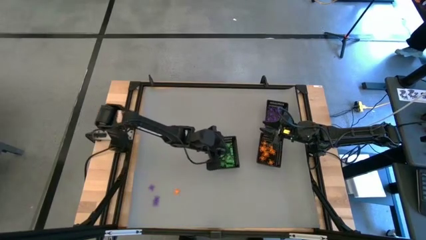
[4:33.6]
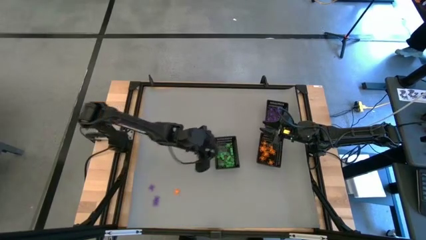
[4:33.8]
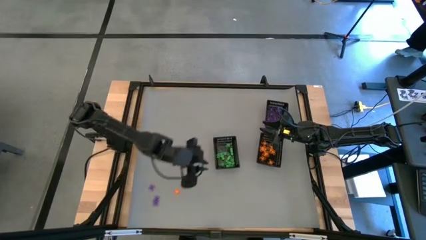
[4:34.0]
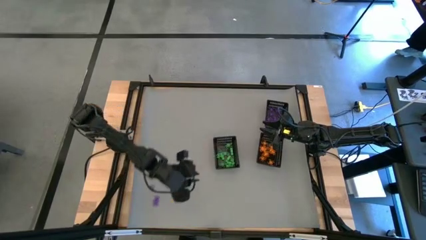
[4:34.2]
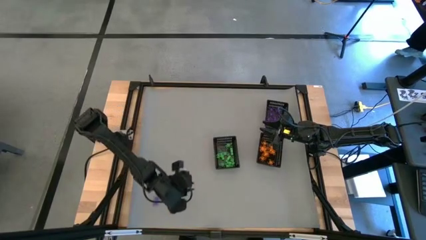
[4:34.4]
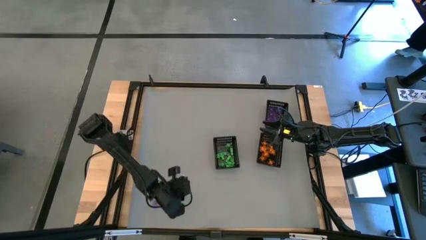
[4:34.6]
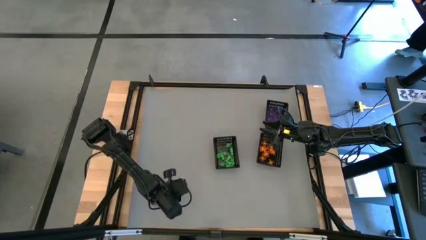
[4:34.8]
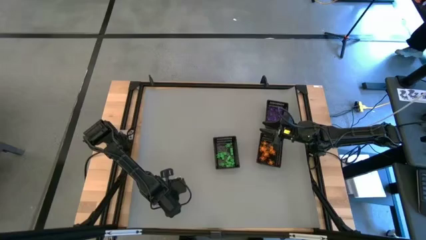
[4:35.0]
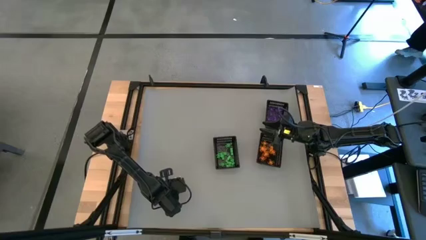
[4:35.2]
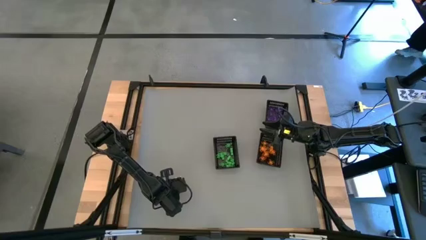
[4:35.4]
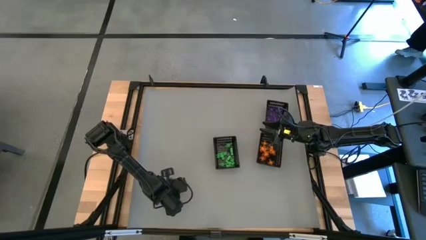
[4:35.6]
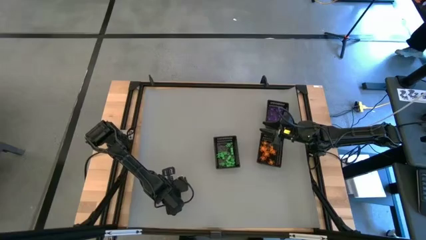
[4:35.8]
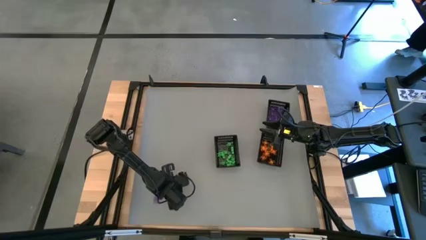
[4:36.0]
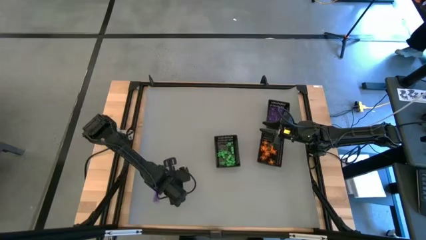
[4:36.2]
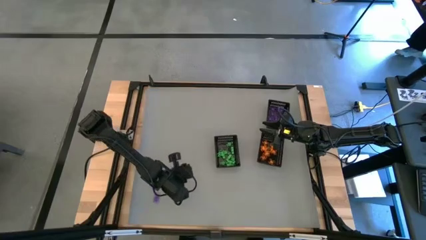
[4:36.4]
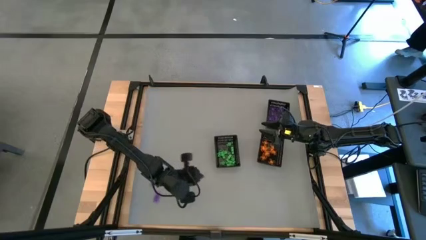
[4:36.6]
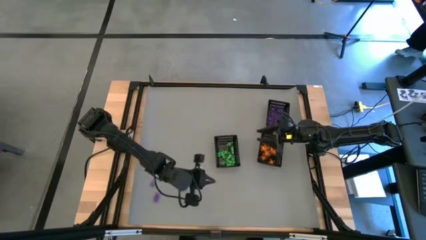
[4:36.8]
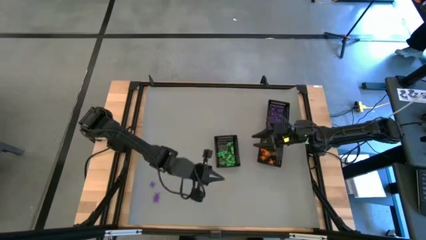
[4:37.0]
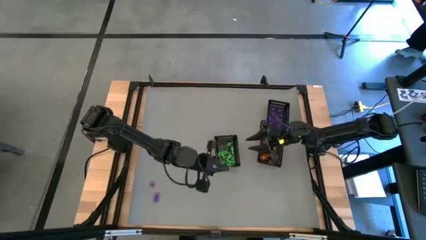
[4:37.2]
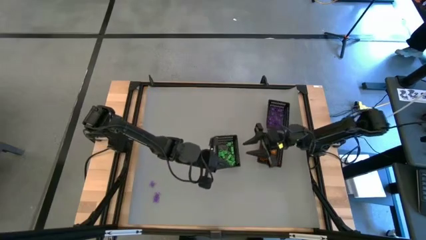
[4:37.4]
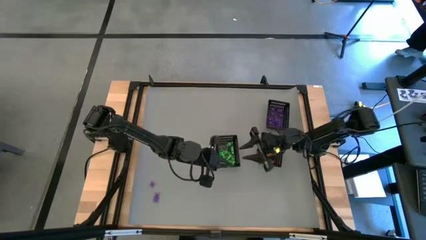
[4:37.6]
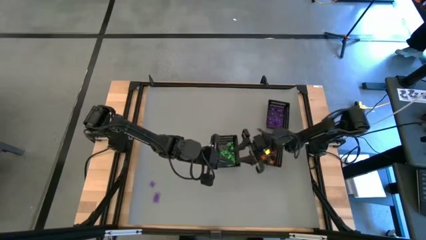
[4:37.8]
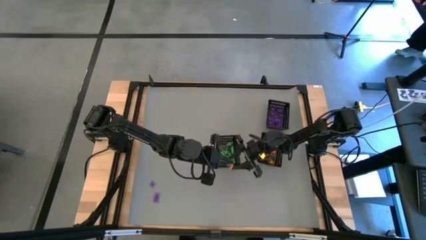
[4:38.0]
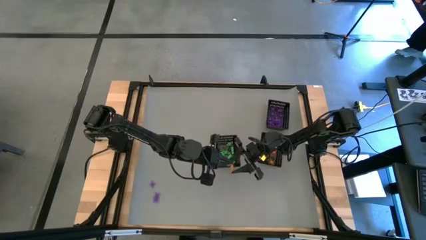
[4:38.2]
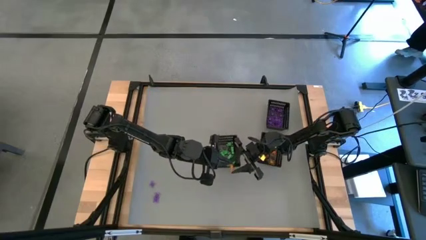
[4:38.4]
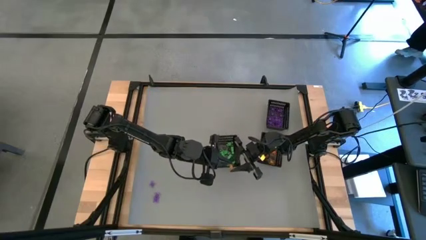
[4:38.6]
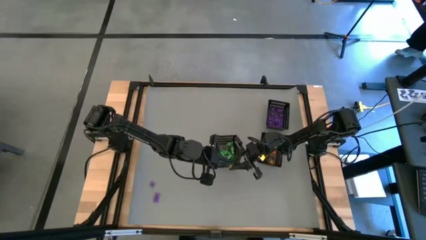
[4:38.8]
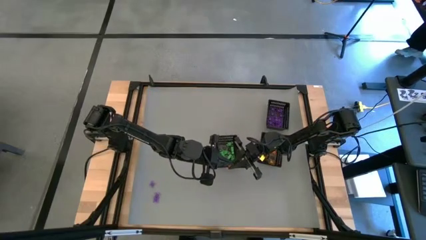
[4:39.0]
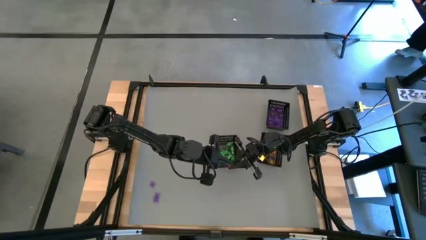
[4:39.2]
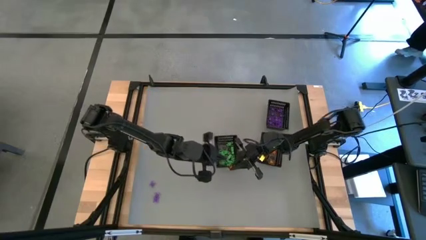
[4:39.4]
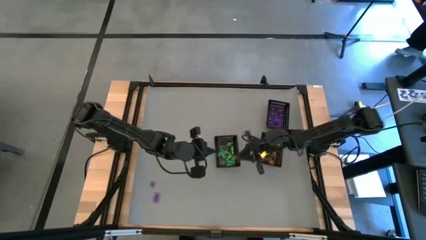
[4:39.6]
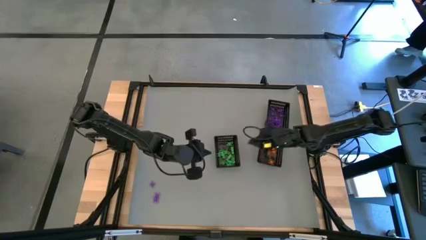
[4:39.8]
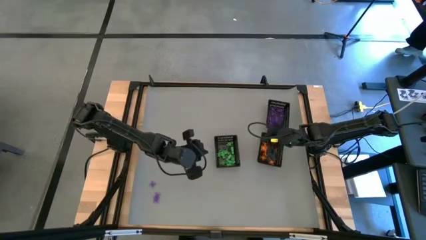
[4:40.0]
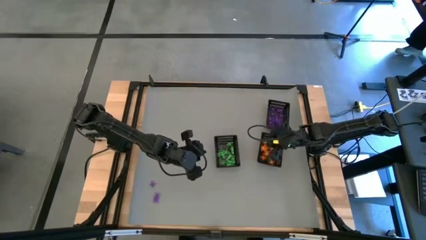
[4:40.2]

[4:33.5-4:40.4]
Task: Sort Halloween decoration
Put the orange spider toy into the bottom right bin

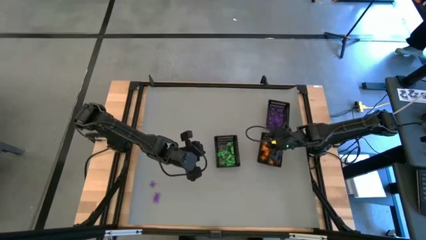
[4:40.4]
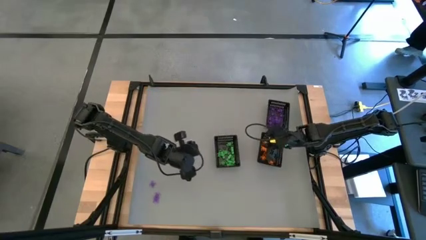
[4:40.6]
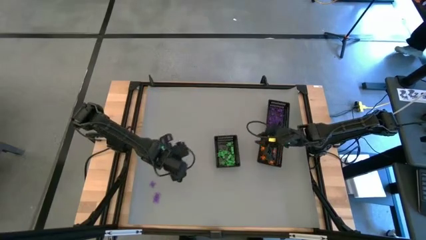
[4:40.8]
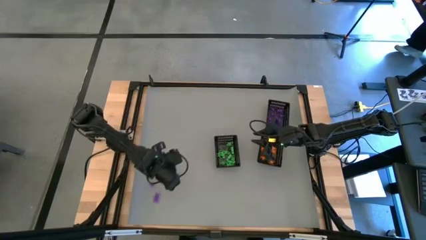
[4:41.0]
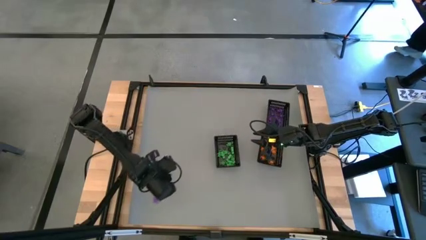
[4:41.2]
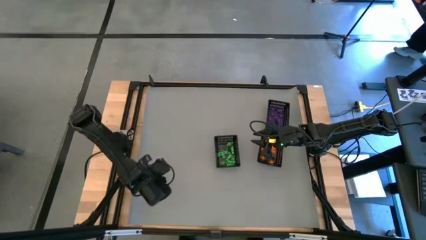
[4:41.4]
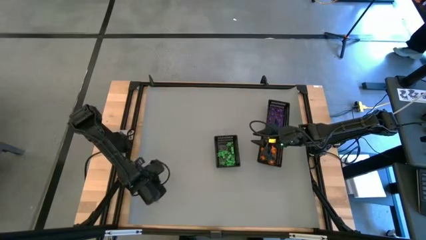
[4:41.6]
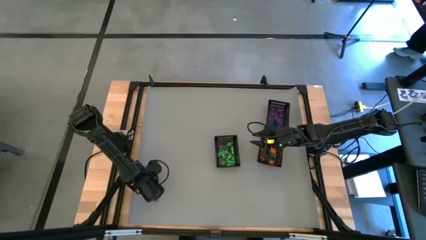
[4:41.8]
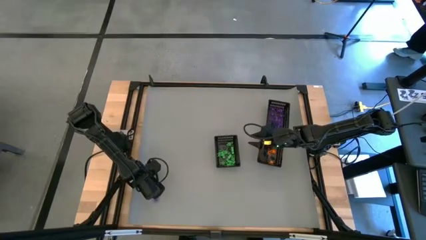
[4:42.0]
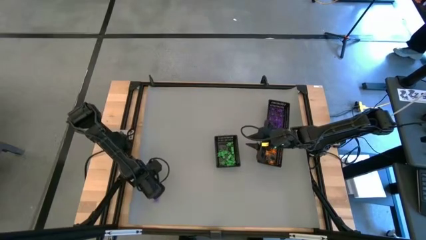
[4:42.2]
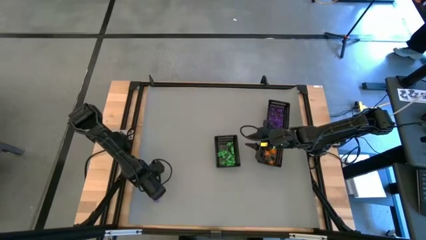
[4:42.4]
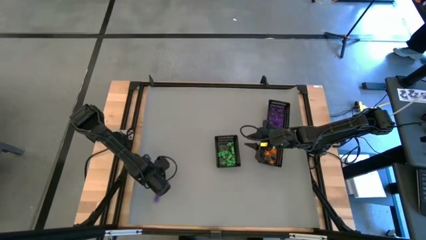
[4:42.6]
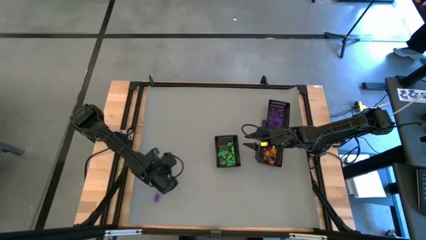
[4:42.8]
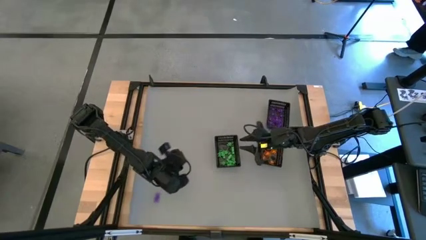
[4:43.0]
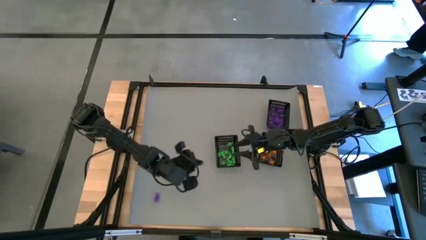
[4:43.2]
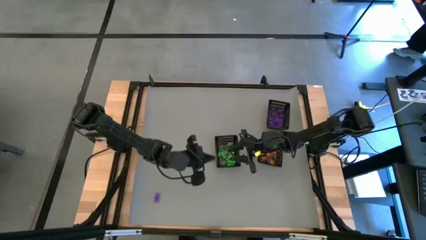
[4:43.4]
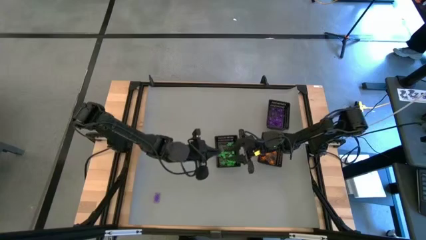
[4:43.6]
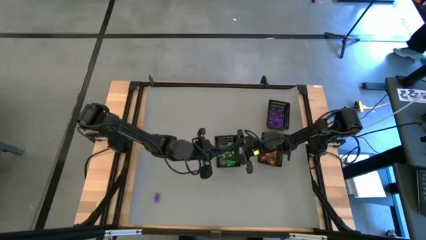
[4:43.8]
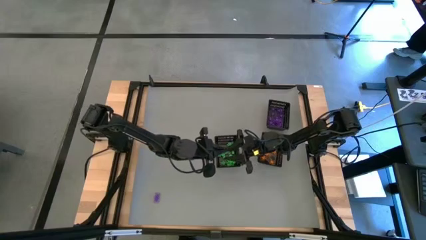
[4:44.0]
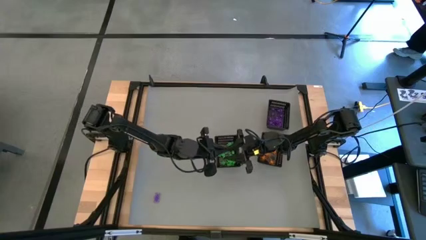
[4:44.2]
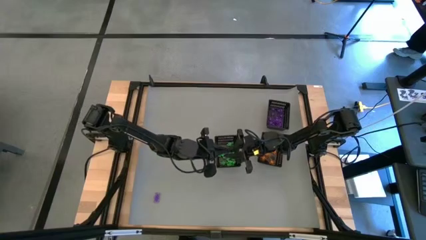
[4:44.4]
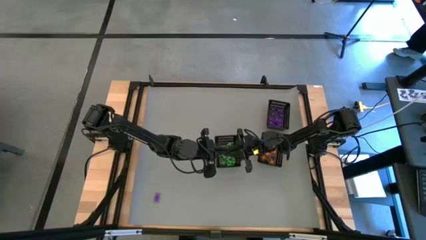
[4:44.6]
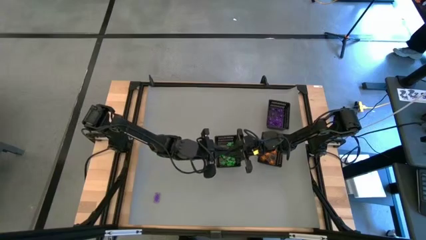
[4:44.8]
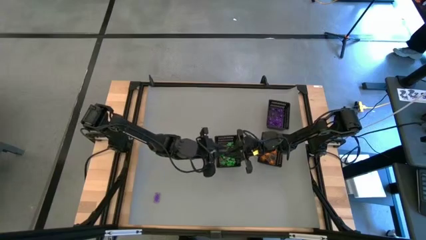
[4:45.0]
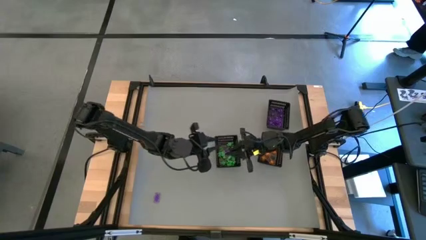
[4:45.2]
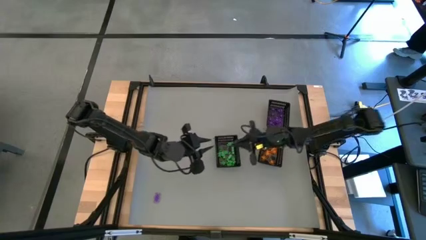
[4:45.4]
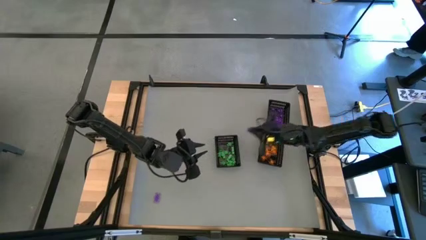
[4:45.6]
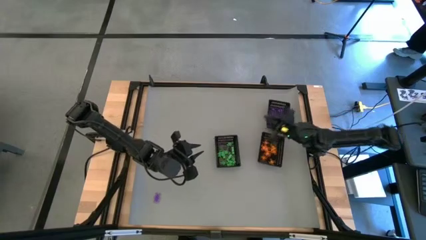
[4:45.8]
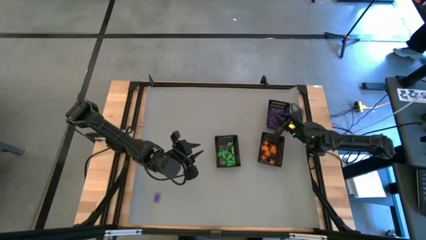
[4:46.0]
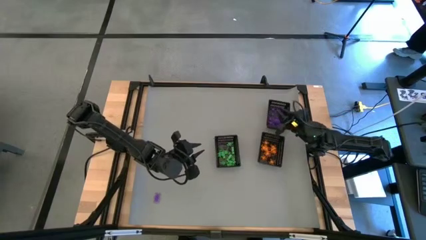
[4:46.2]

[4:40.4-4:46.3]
Put the top purple spider toy into the top bin

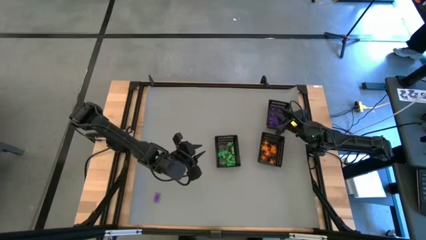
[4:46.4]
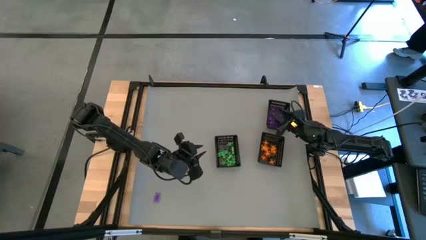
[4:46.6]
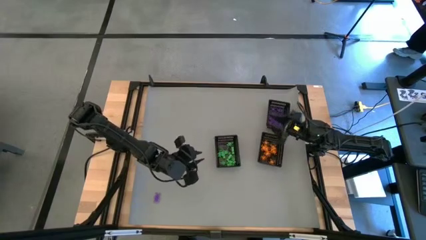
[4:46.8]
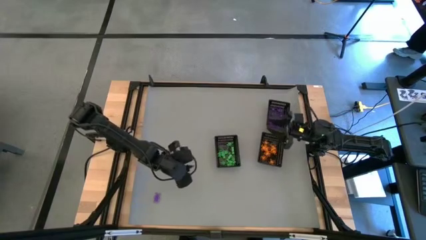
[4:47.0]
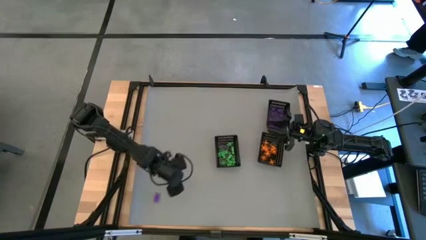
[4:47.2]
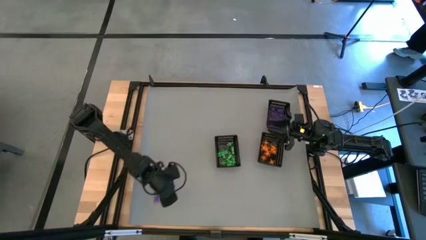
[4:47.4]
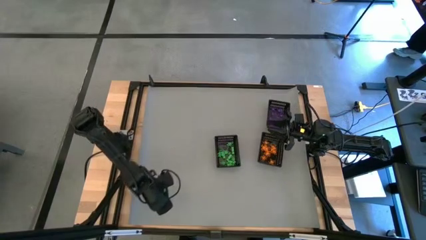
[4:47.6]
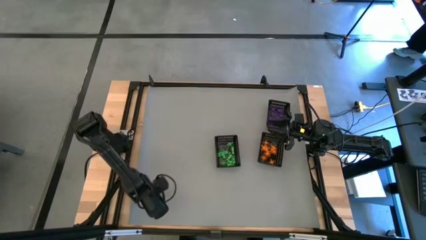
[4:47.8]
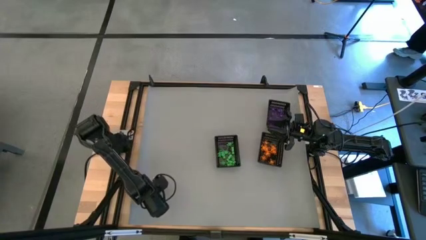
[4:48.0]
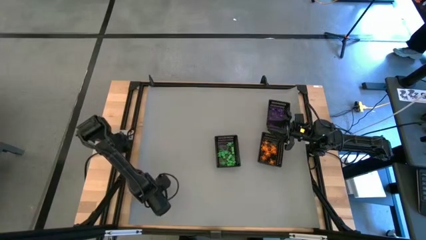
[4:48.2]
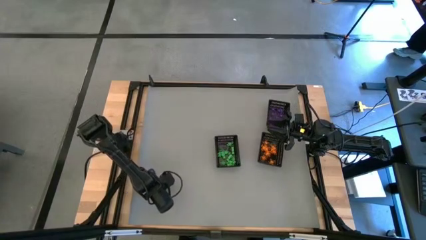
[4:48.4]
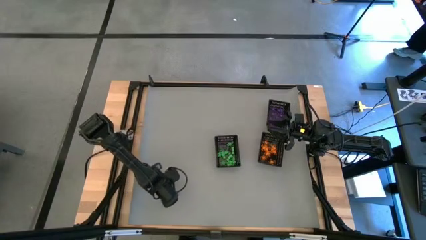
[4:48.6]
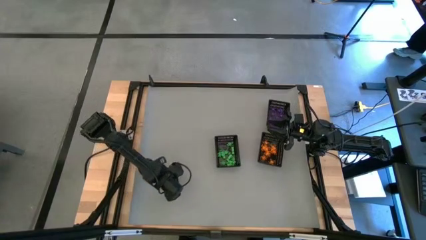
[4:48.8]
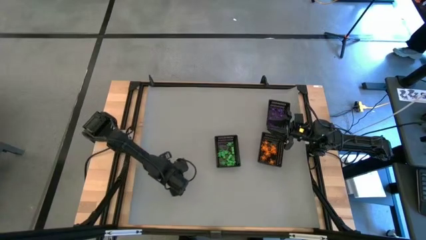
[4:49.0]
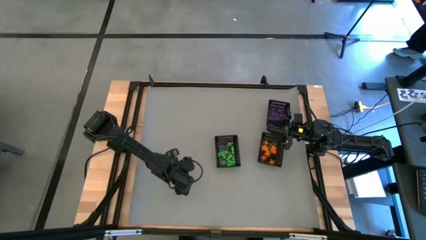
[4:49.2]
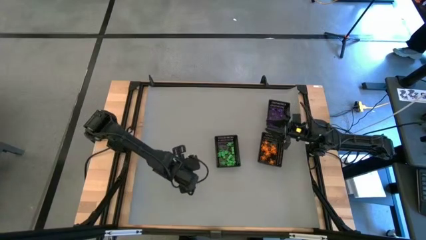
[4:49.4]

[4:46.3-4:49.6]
Put the bottom purple spider toy into the top bin
